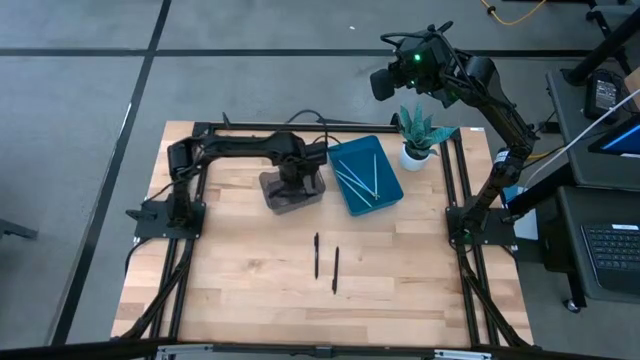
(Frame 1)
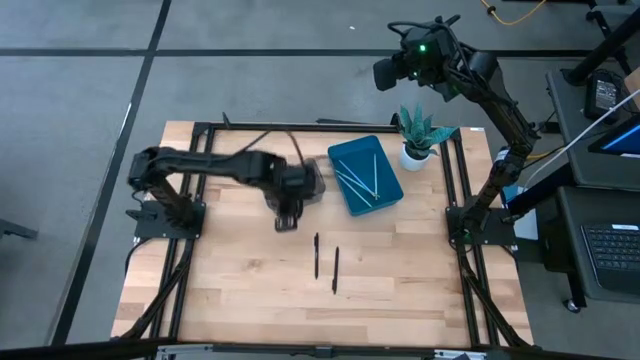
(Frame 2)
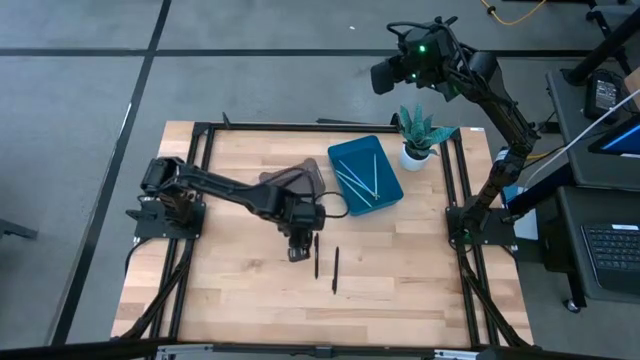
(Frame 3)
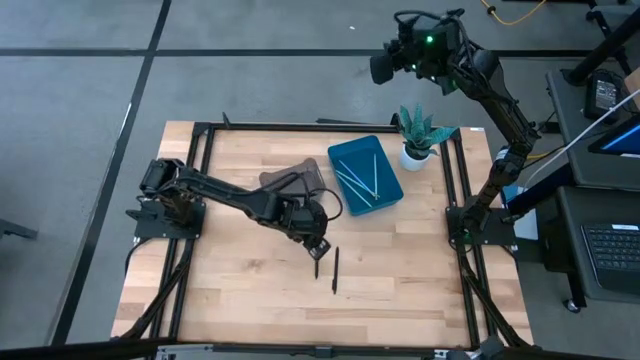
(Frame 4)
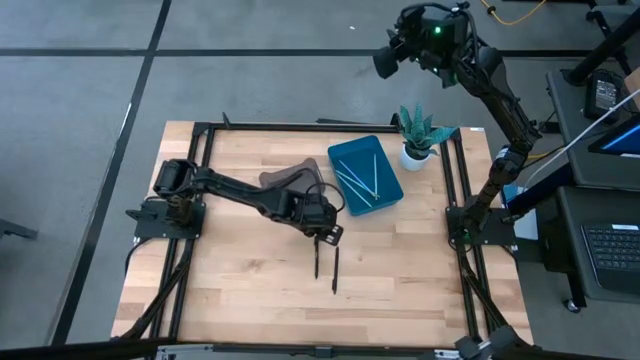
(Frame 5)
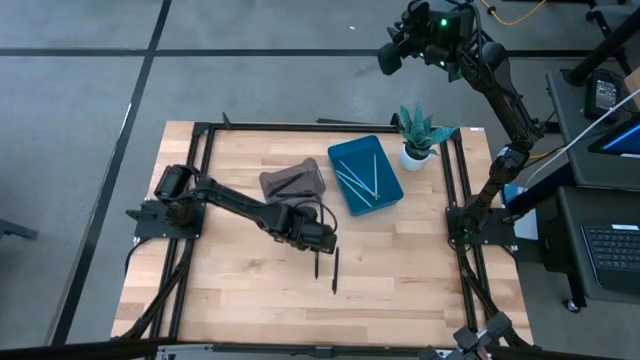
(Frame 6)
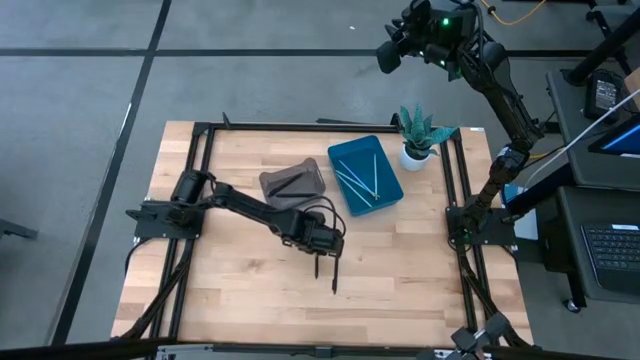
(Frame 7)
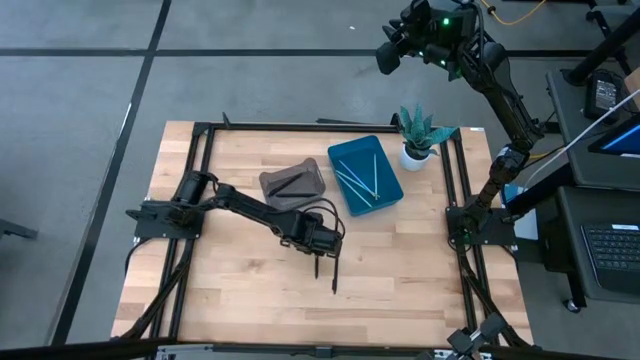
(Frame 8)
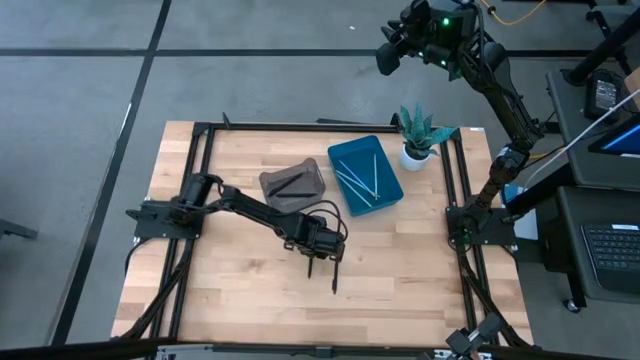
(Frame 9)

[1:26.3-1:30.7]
Task: Sort pens & pencils
Put the left black pen into the black bin

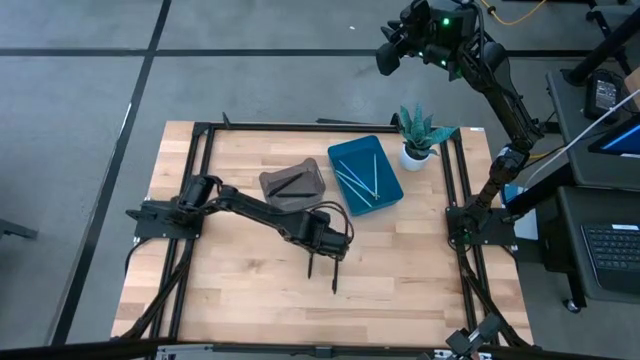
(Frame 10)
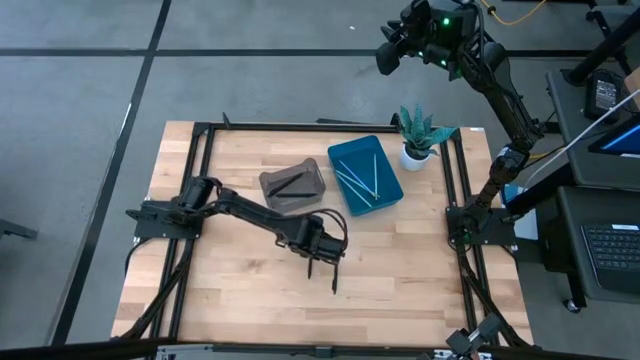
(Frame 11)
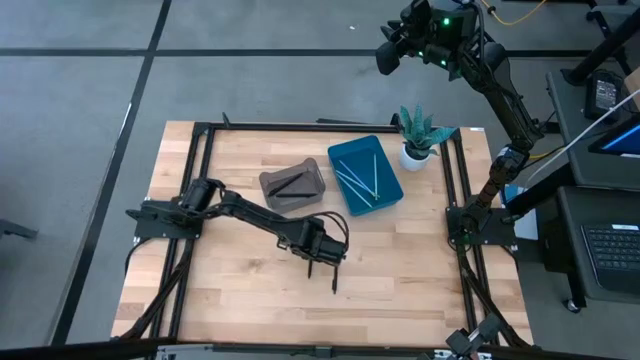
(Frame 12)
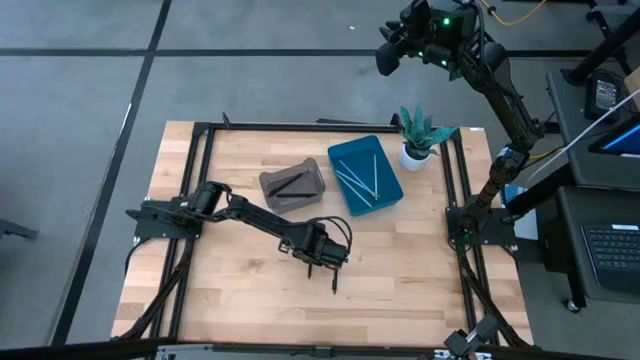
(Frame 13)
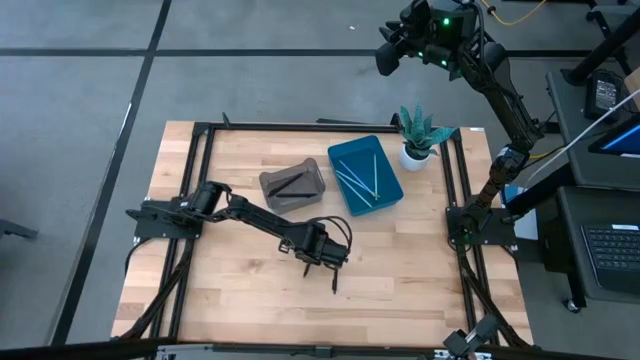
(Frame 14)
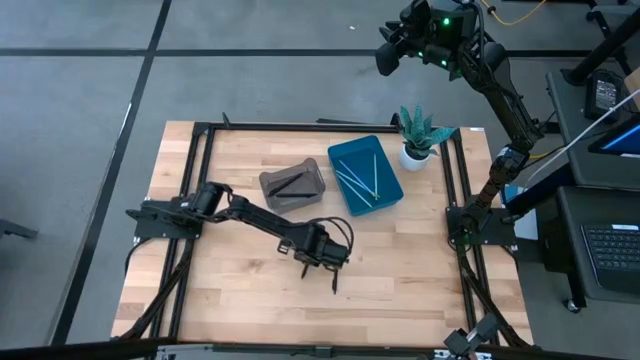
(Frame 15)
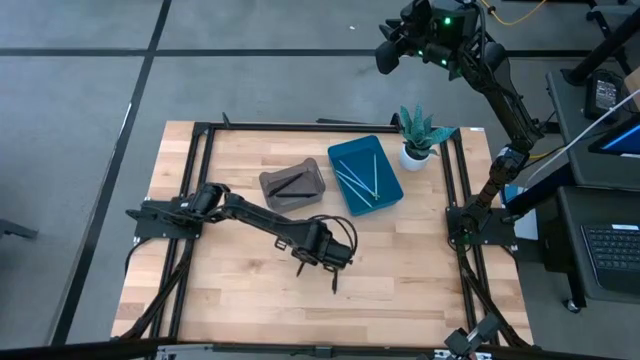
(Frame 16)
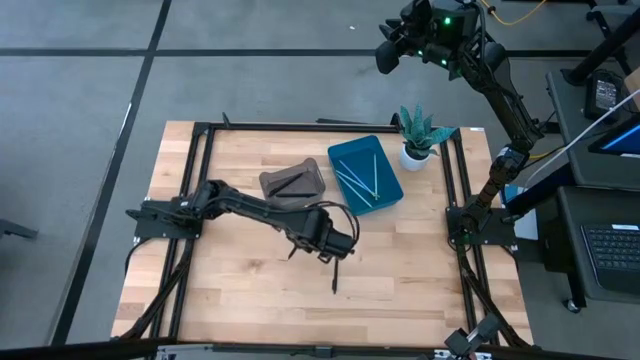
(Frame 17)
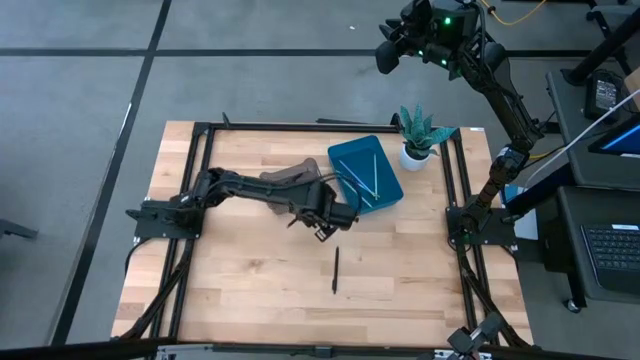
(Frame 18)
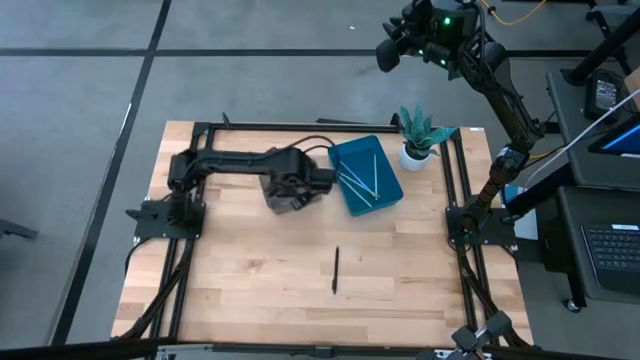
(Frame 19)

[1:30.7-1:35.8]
Put the left black pen into the black bin

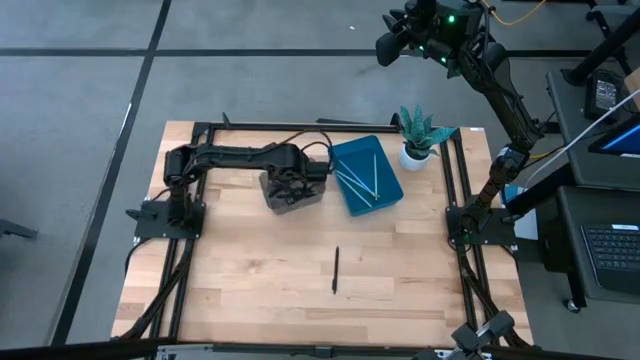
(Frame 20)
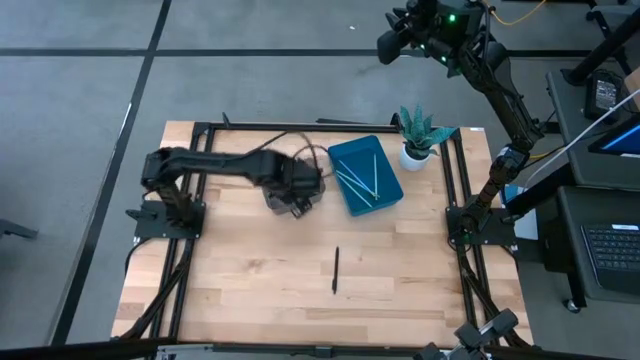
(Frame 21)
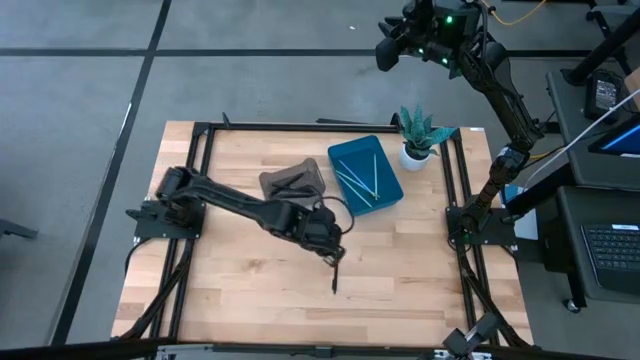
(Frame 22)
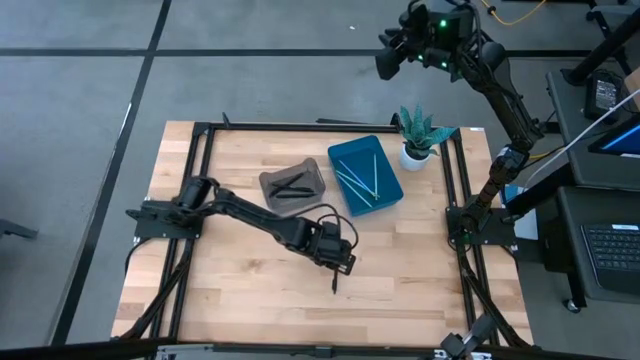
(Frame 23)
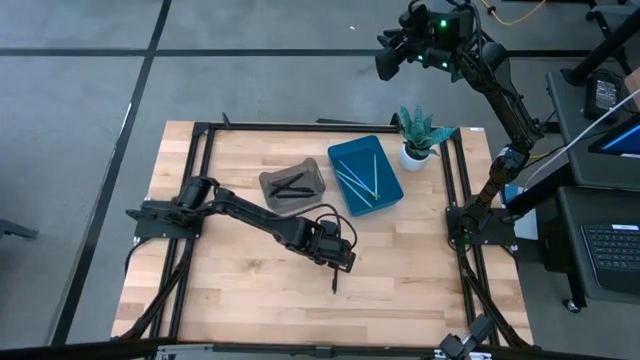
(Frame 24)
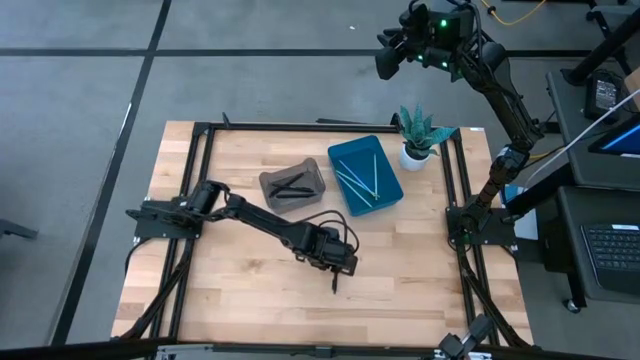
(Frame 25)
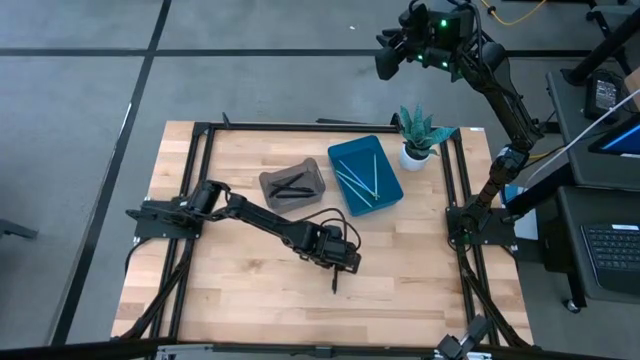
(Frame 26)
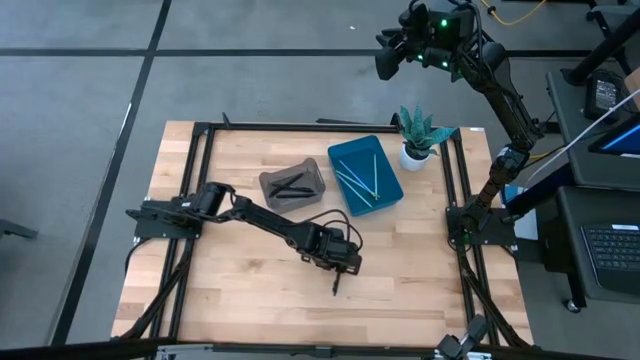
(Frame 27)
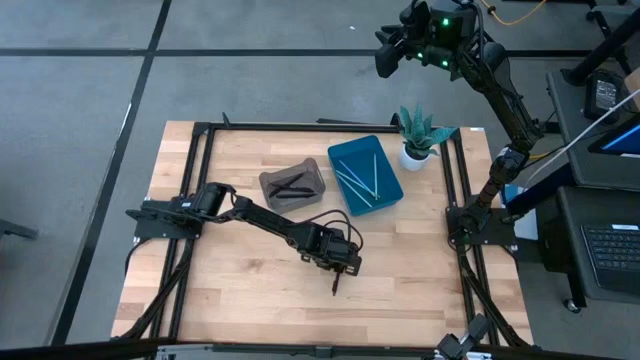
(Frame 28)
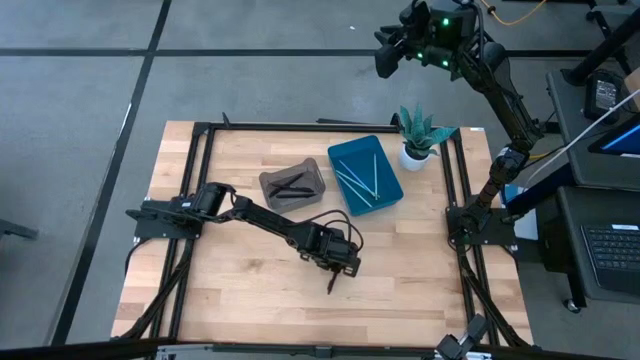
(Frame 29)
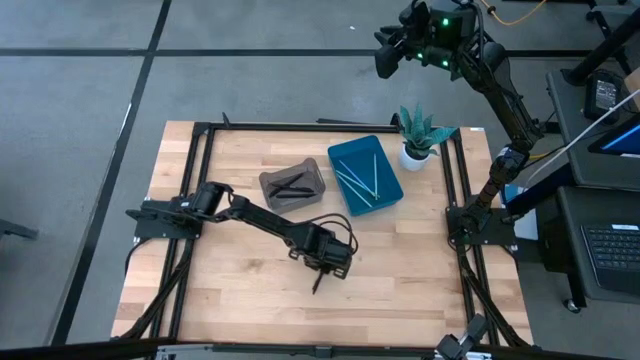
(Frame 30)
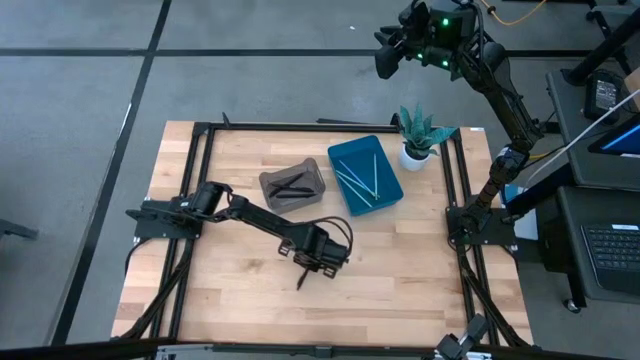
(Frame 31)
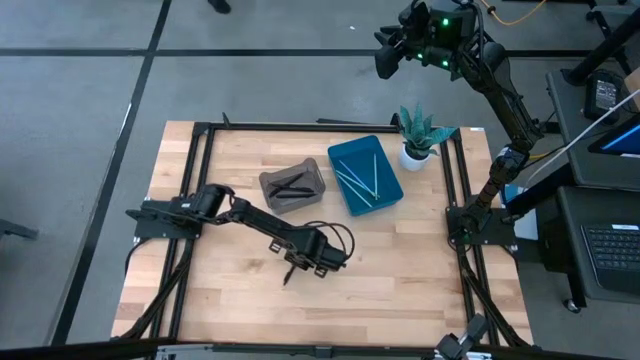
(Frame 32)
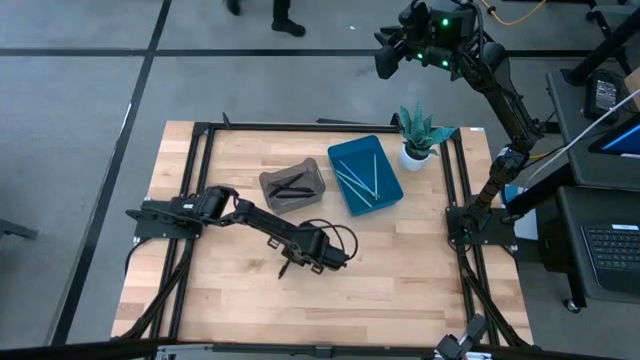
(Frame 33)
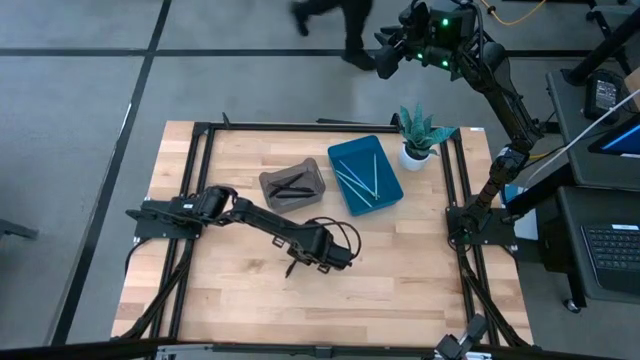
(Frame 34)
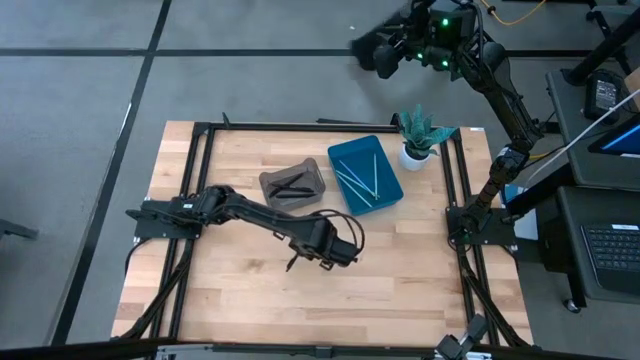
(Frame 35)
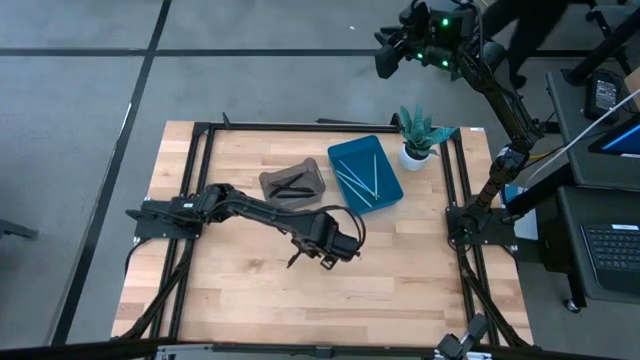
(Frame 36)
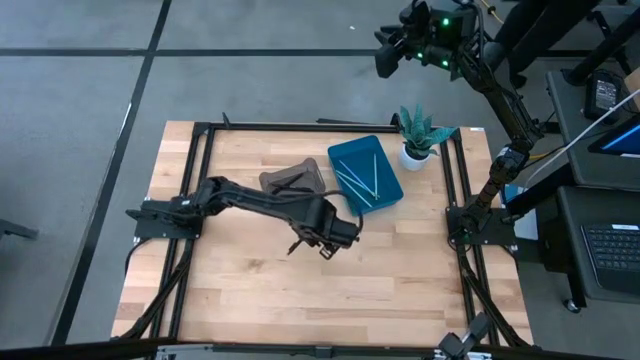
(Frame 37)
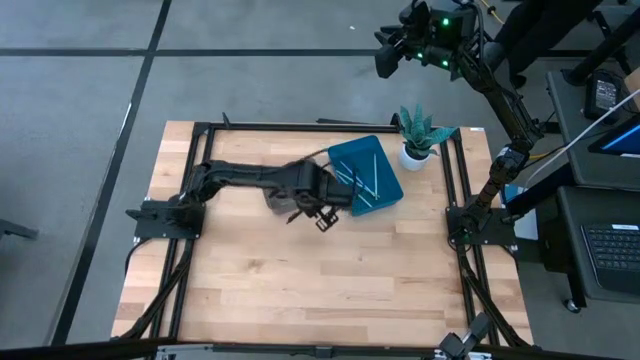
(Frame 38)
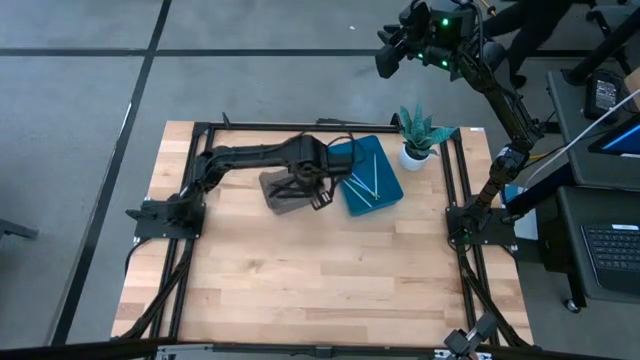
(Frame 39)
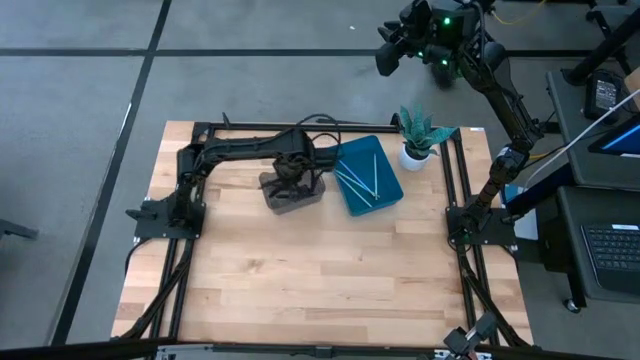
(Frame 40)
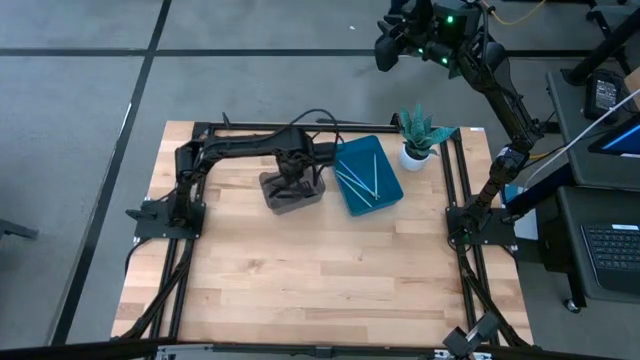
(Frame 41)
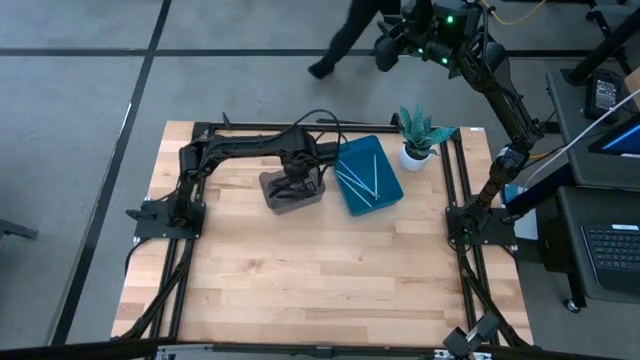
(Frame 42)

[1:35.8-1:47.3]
Put the black pen into the black bin
